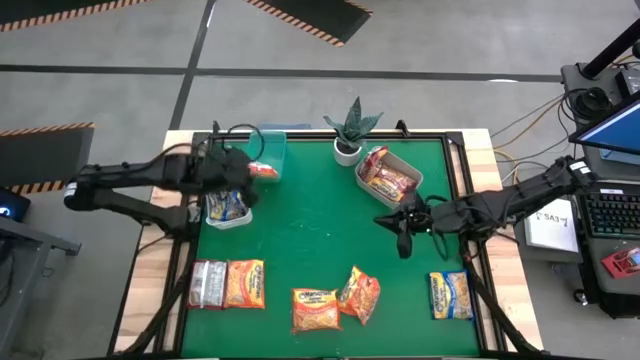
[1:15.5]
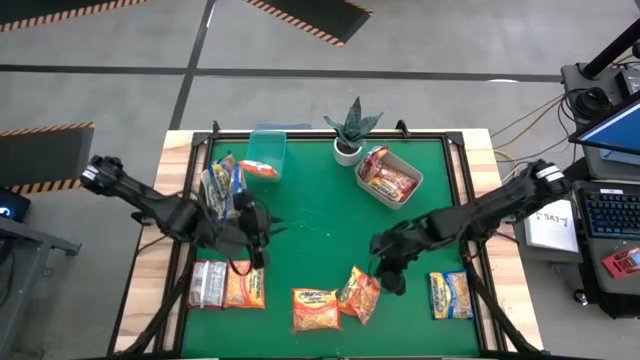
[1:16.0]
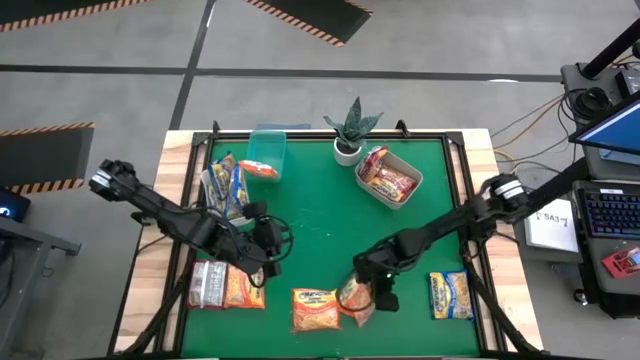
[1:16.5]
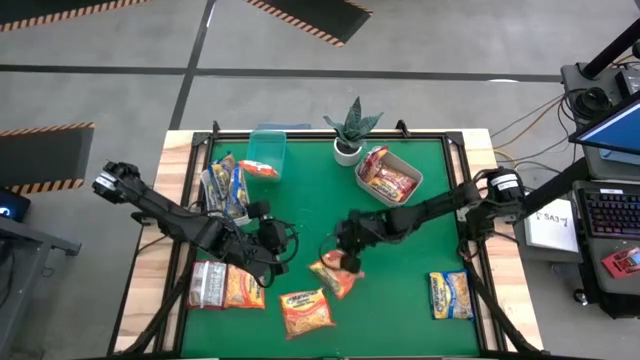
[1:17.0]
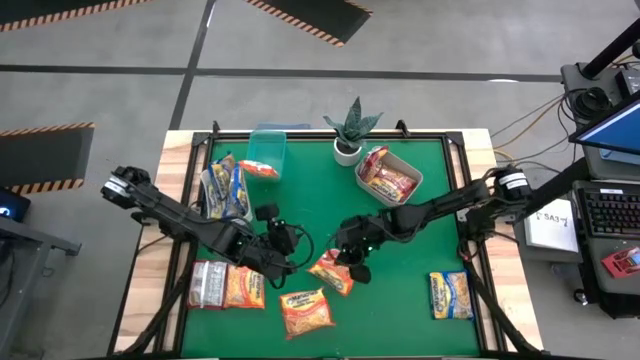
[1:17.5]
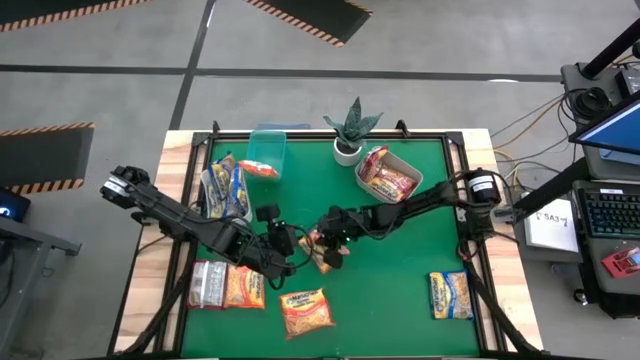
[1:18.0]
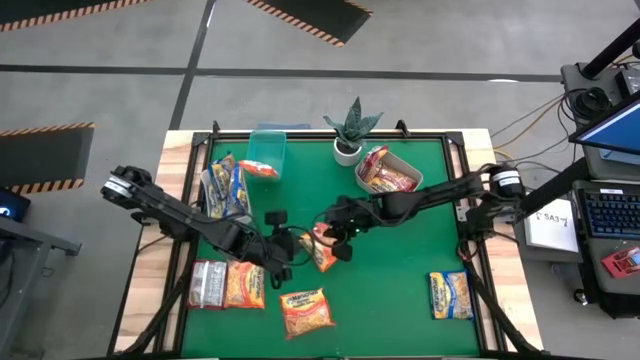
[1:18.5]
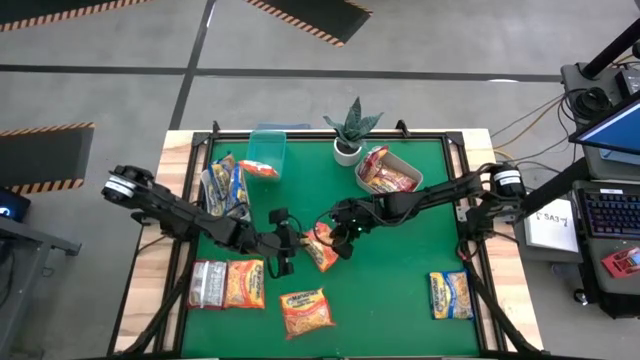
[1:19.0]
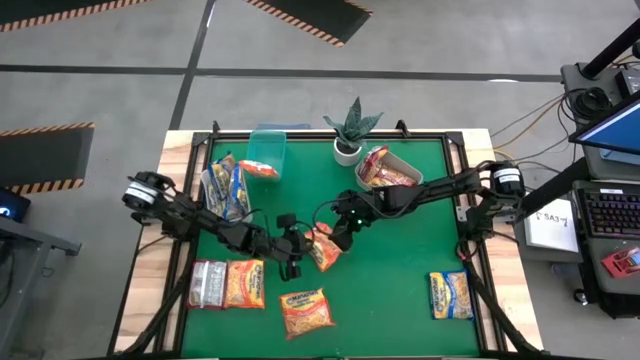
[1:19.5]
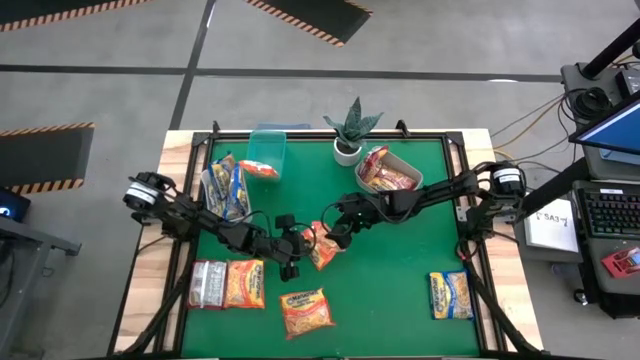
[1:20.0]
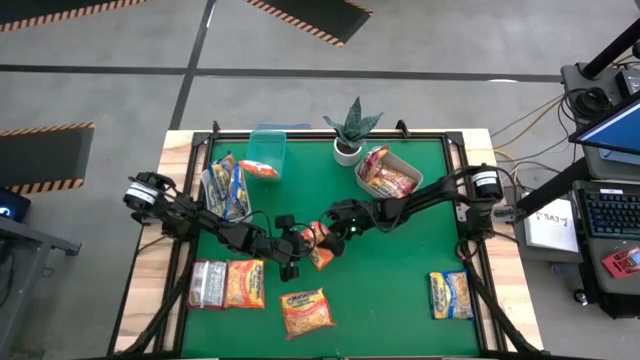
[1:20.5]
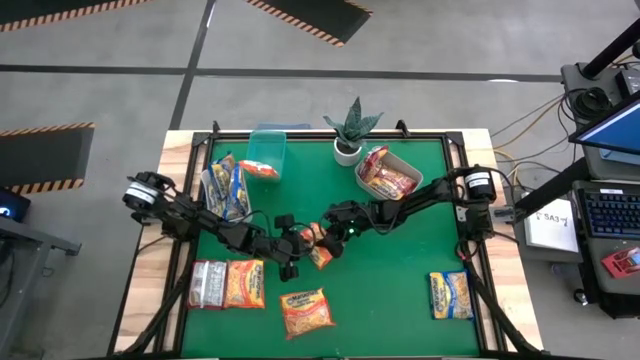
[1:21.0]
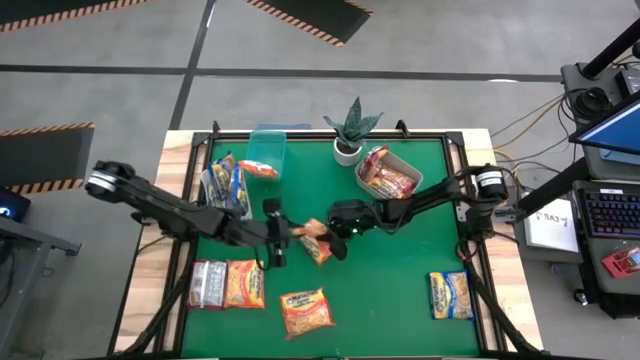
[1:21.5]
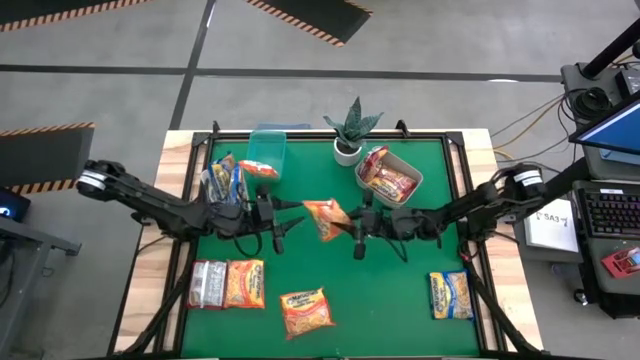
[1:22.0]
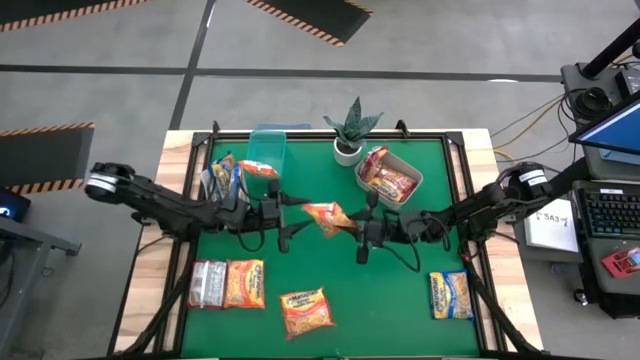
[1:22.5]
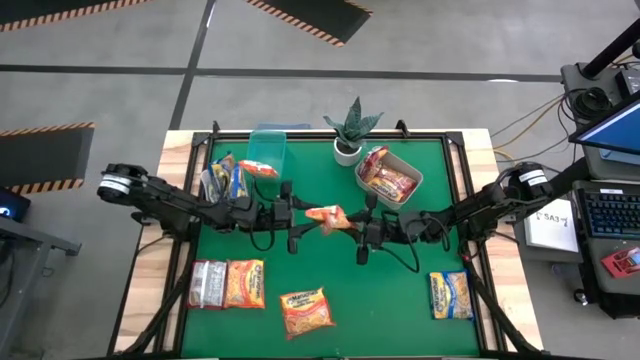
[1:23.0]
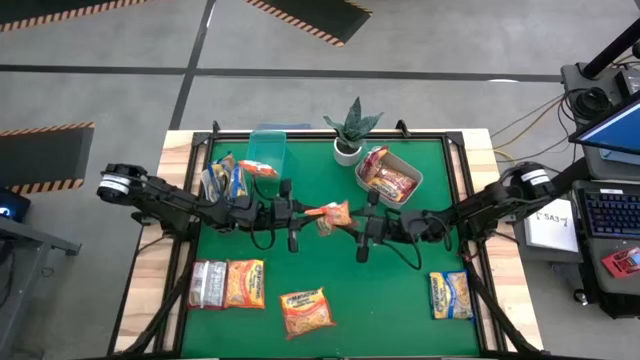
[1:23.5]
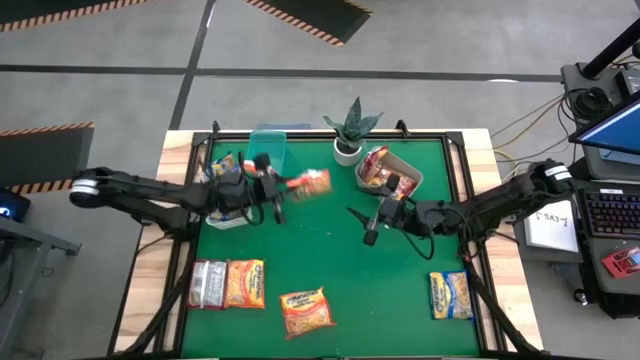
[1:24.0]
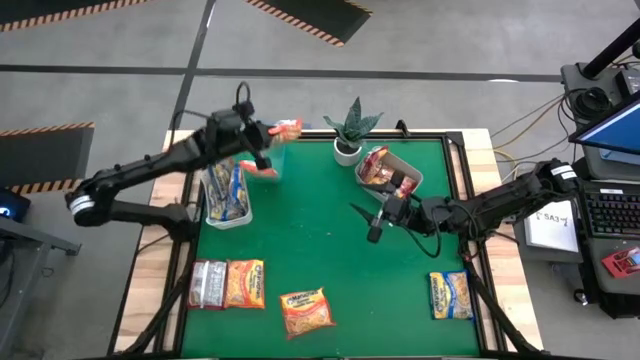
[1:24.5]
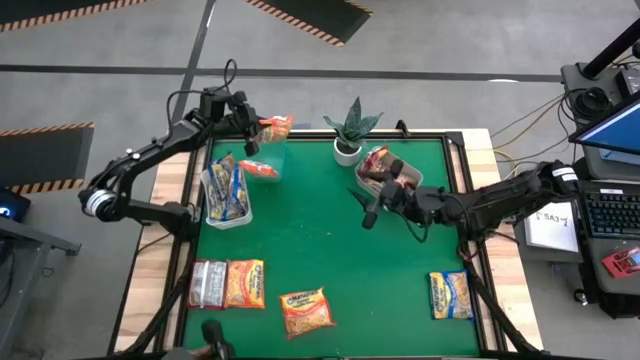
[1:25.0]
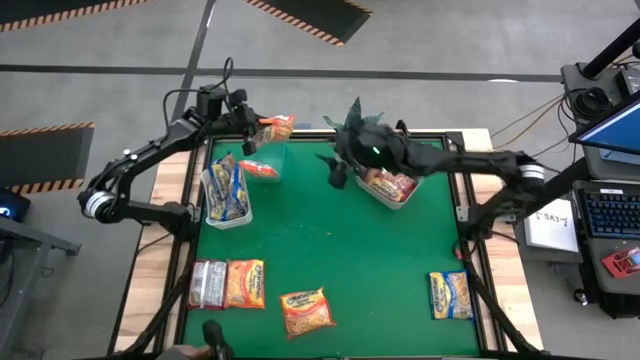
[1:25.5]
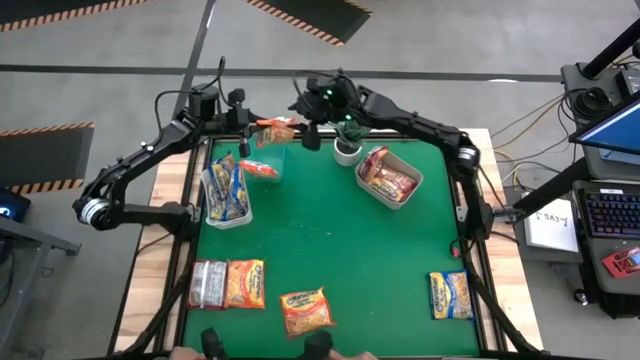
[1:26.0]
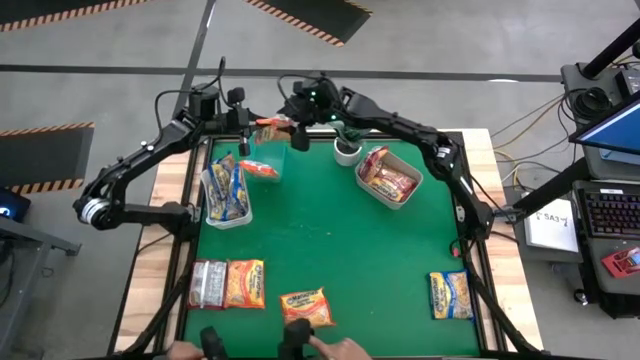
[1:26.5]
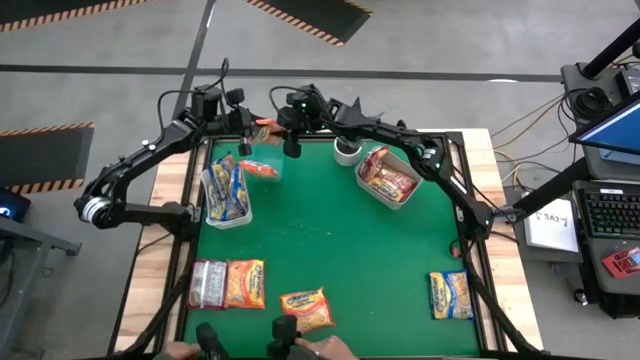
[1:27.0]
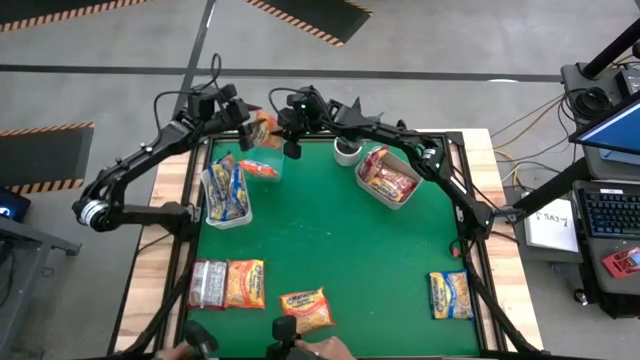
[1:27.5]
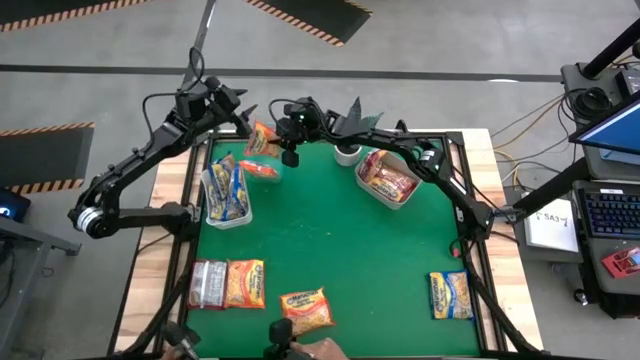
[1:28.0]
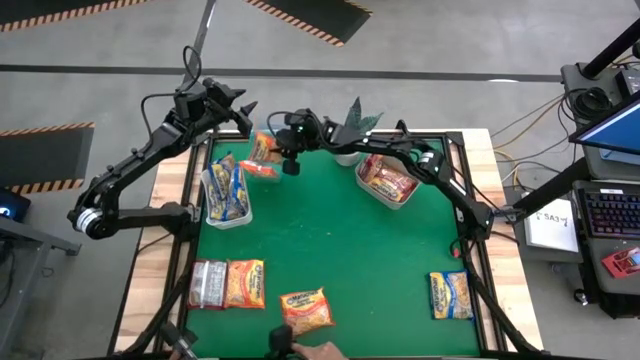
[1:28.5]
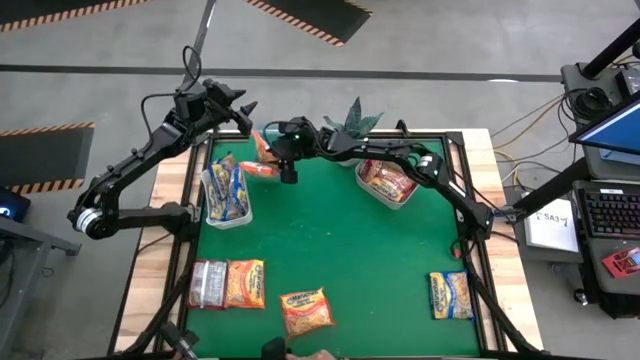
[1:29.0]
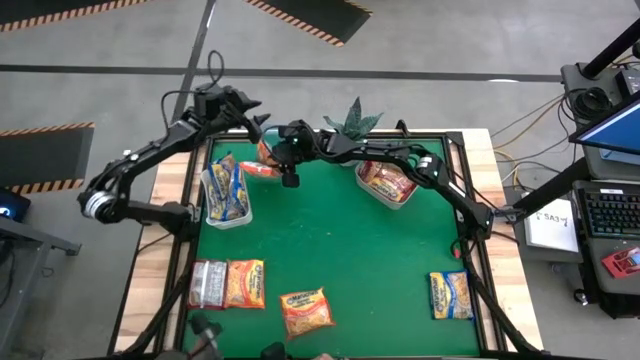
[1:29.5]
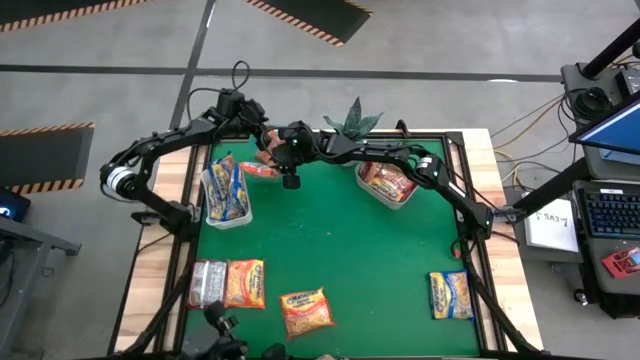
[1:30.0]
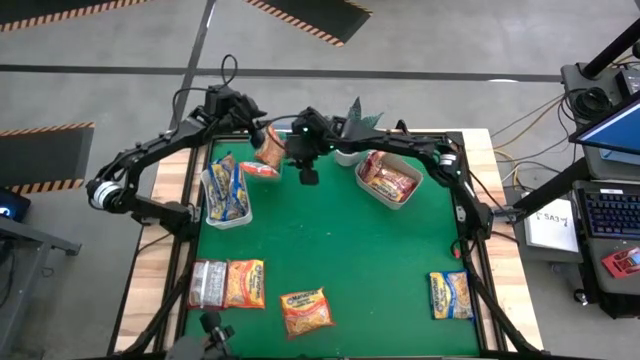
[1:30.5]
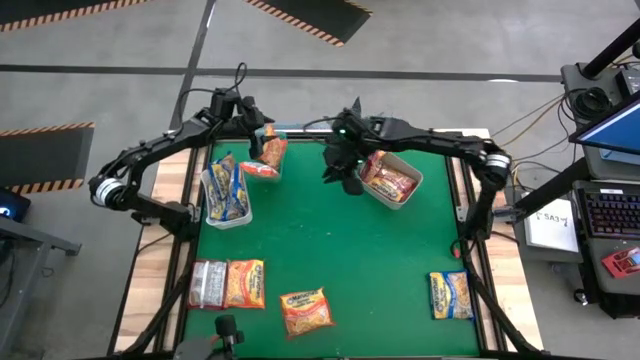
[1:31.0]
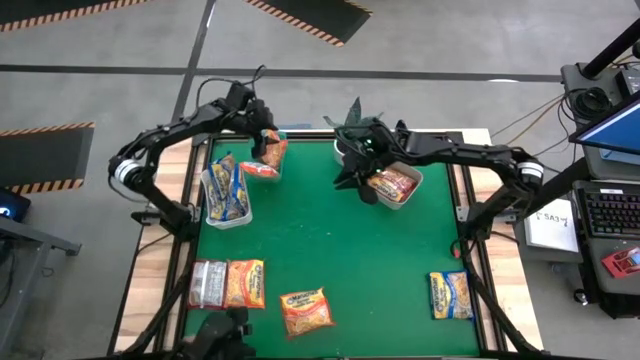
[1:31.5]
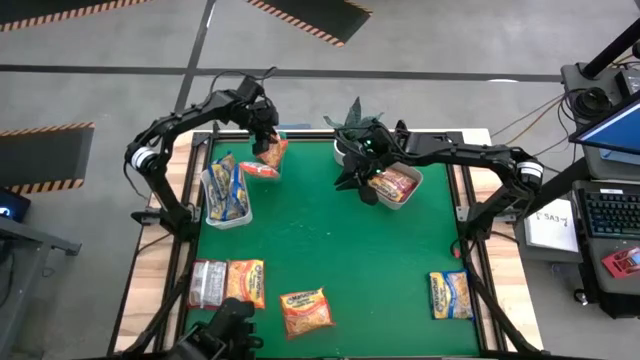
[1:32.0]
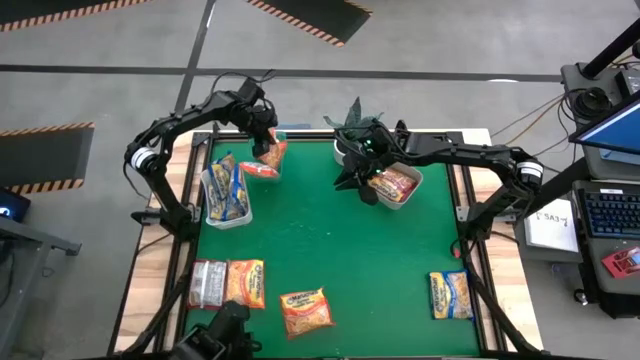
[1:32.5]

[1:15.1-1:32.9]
Task: Sort Maruchan noodles
Put the orange noodle pack into the green bin

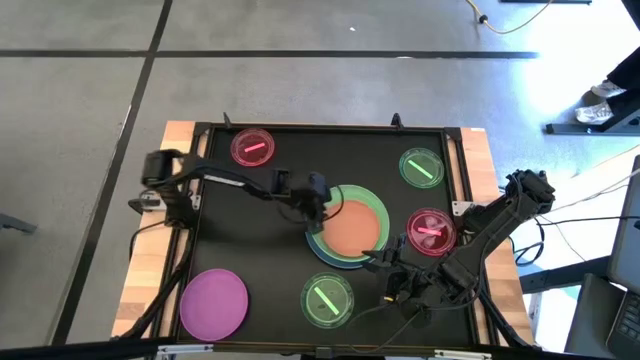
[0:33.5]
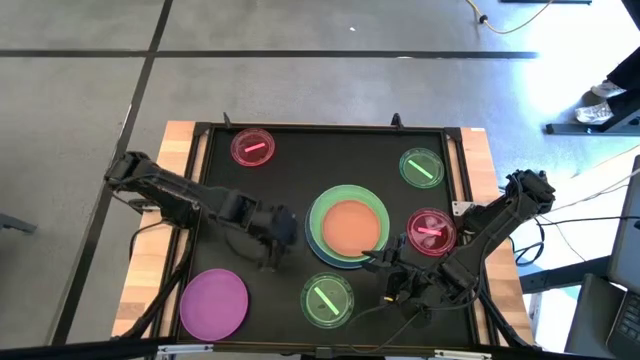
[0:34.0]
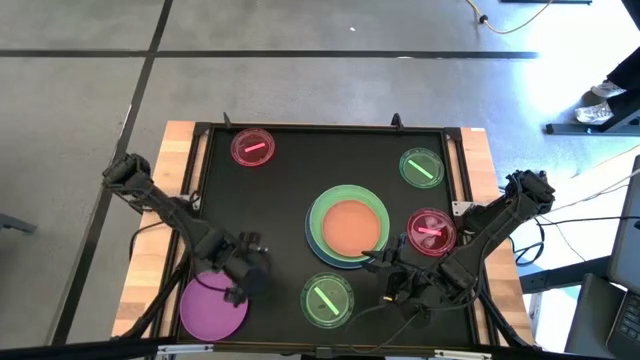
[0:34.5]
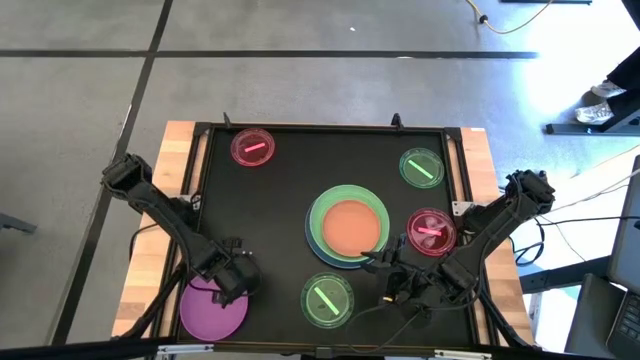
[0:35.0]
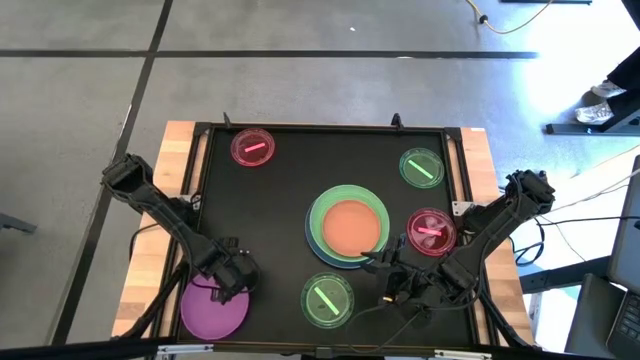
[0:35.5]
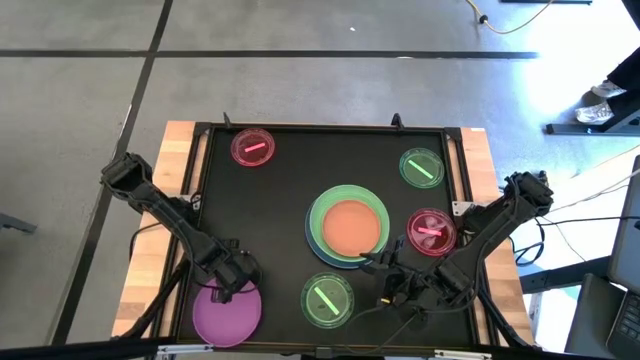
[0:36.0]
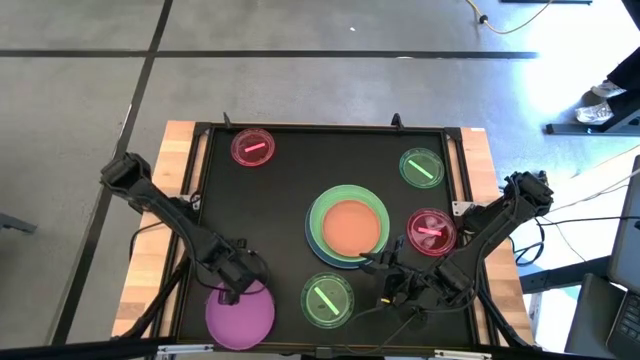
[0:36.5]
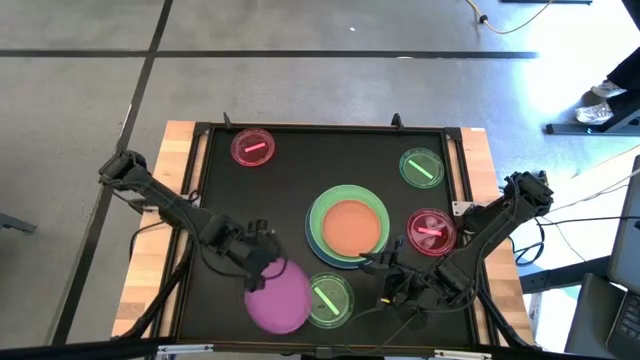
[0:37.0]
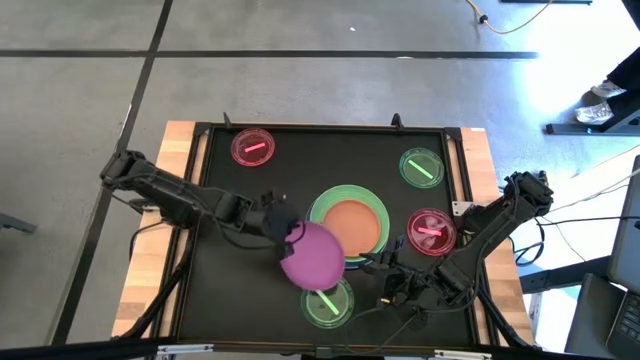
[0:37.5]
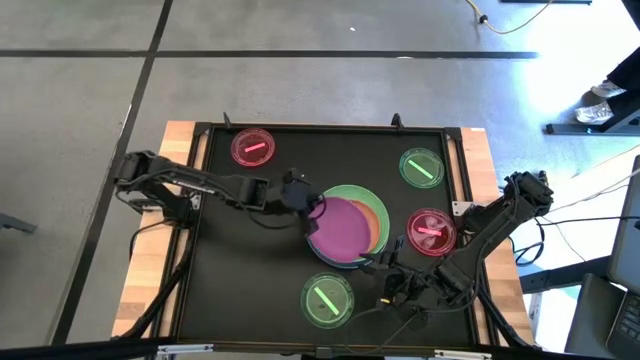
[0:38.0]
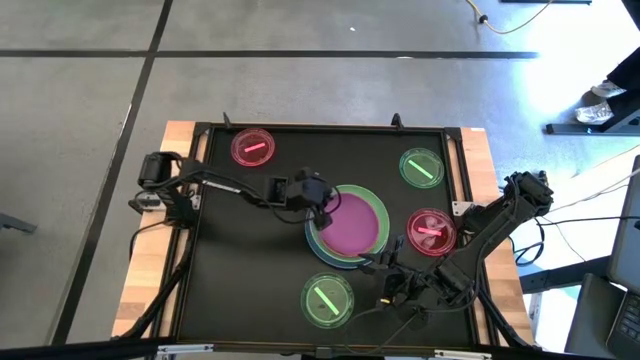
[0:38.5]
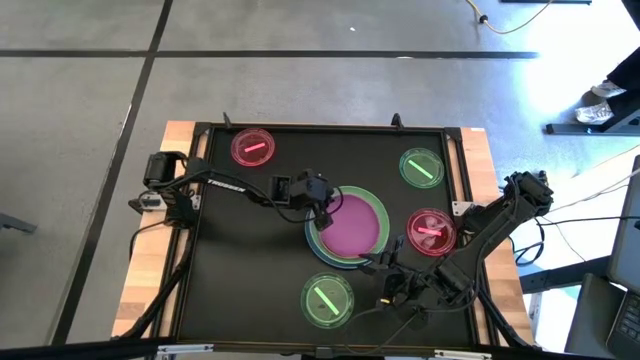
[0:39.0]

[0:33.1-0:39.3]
Task: Stack plastic plates
Stack the purple plate on top of the orange plate
